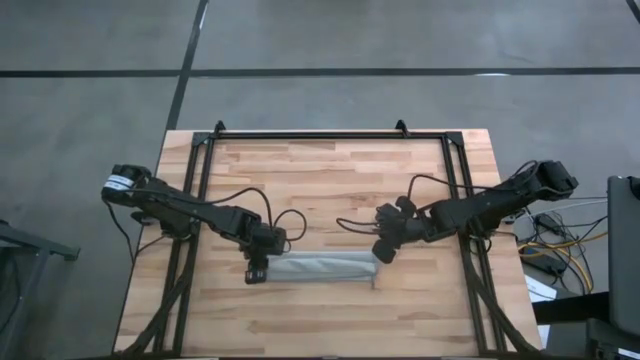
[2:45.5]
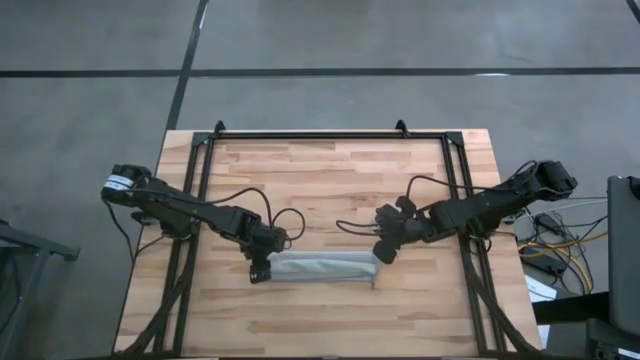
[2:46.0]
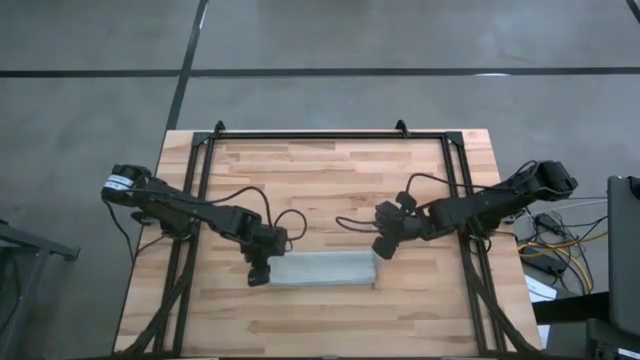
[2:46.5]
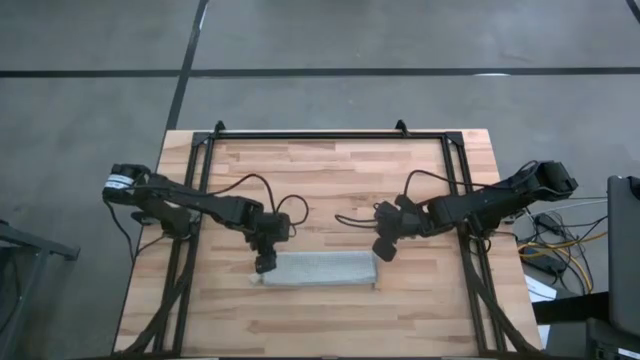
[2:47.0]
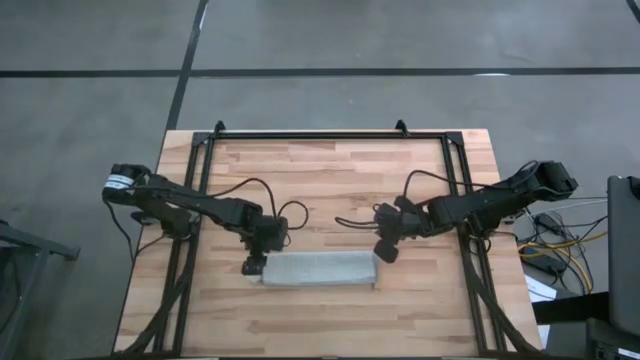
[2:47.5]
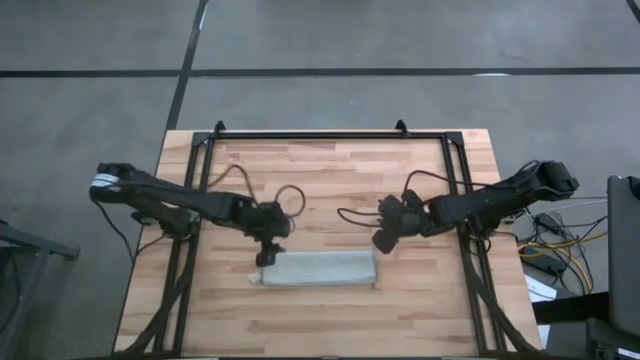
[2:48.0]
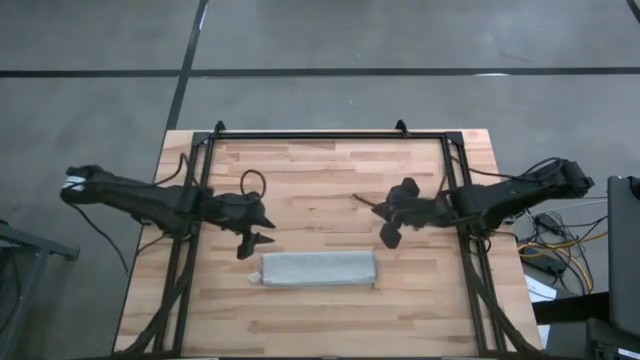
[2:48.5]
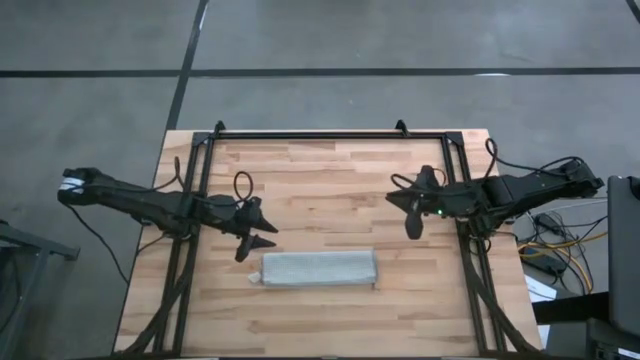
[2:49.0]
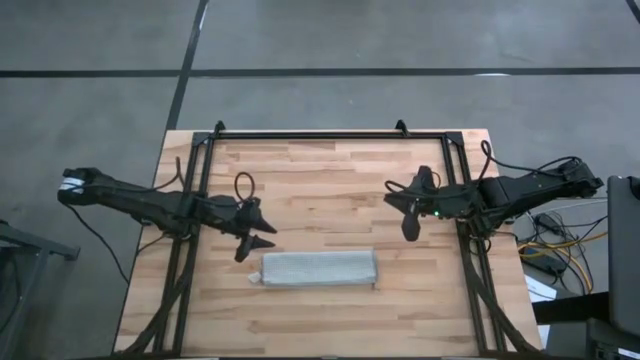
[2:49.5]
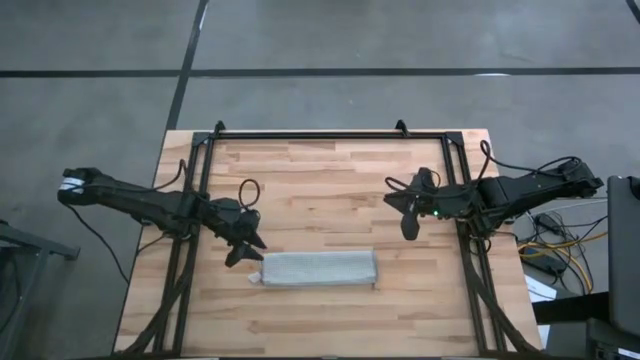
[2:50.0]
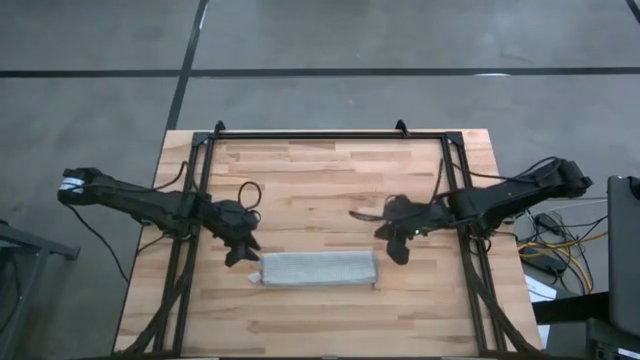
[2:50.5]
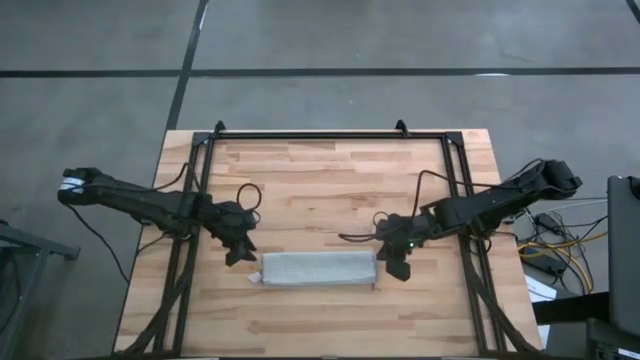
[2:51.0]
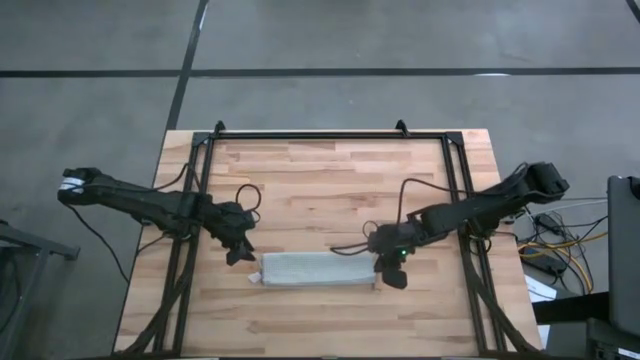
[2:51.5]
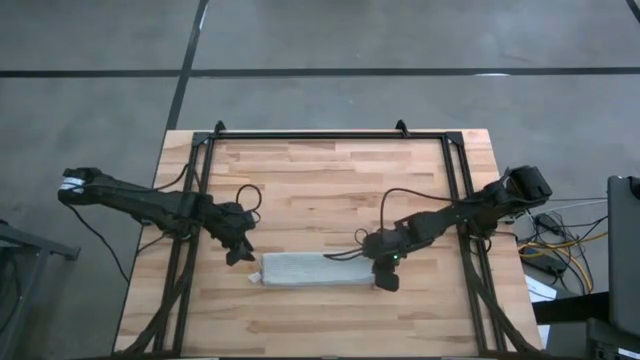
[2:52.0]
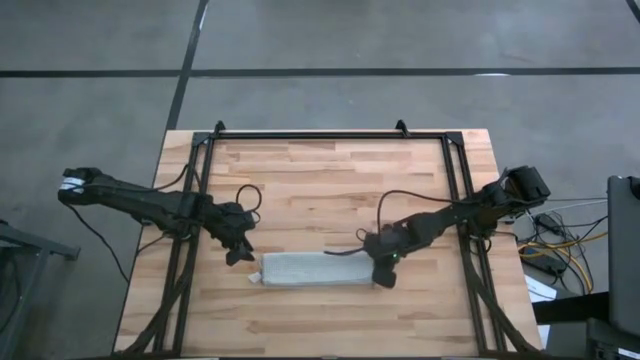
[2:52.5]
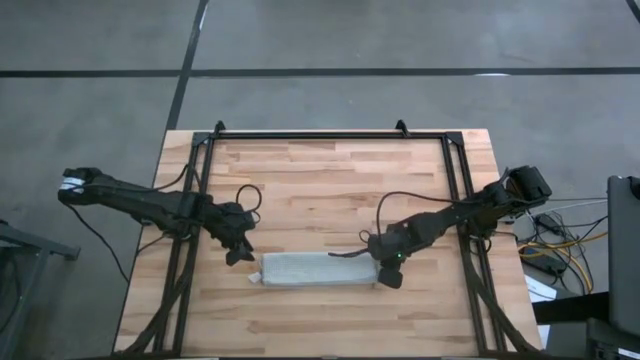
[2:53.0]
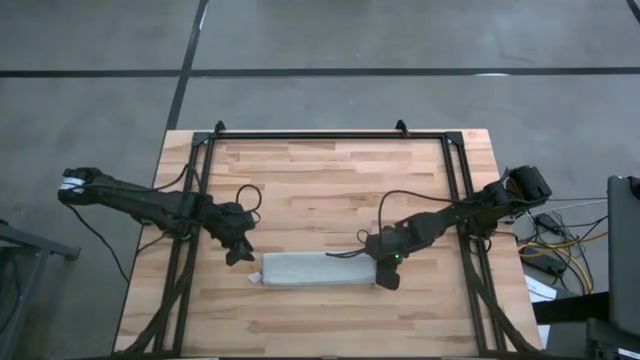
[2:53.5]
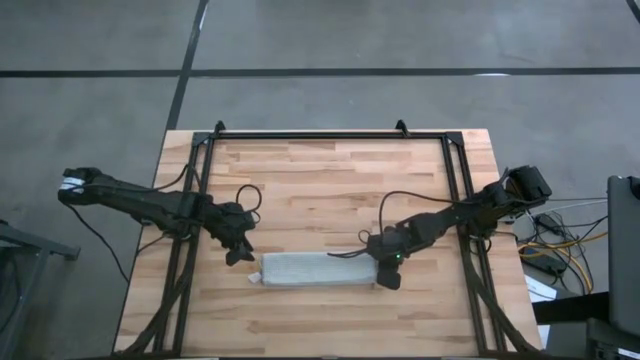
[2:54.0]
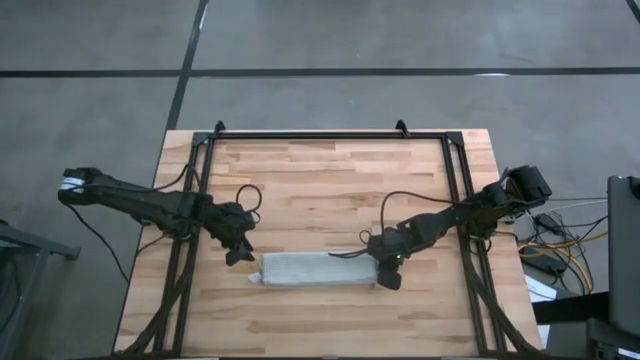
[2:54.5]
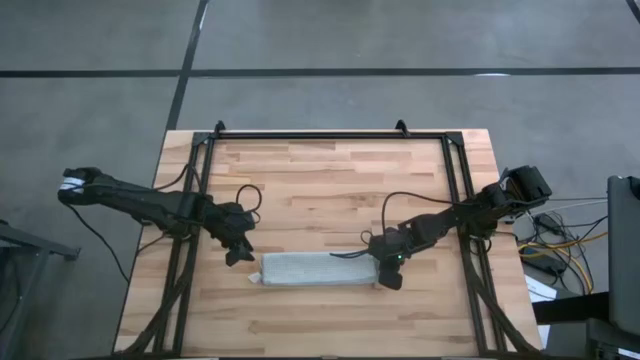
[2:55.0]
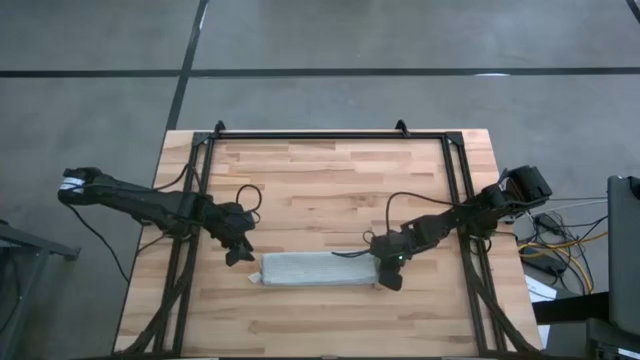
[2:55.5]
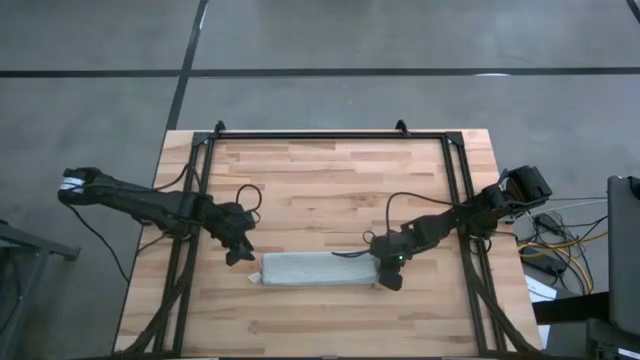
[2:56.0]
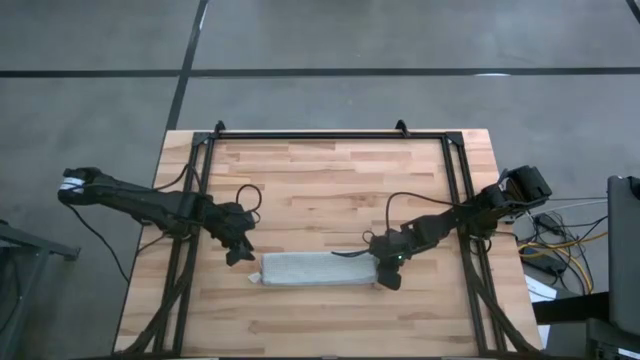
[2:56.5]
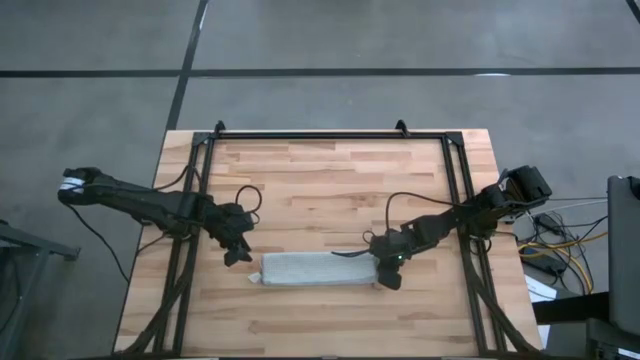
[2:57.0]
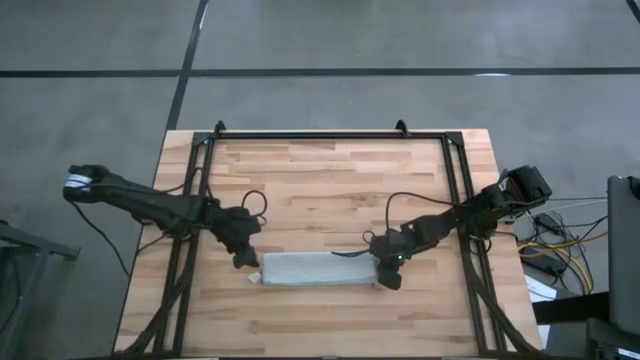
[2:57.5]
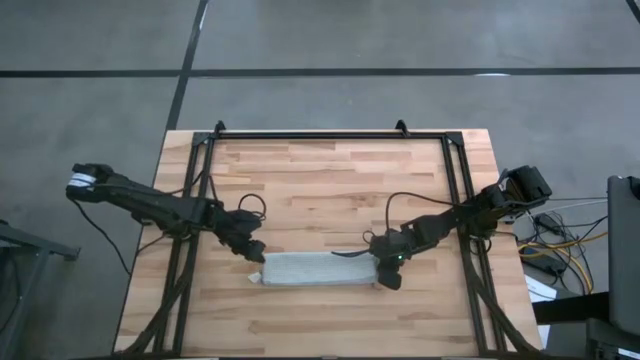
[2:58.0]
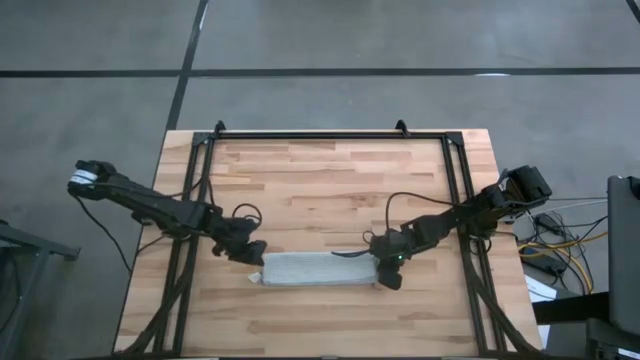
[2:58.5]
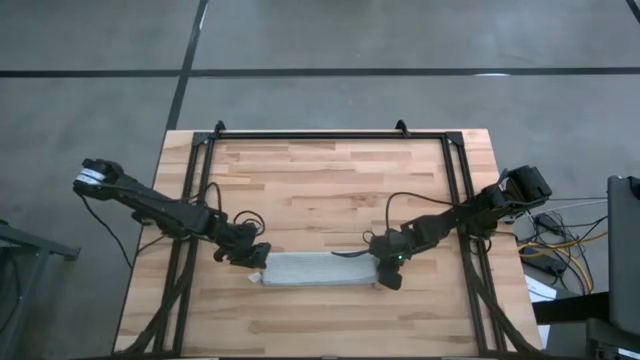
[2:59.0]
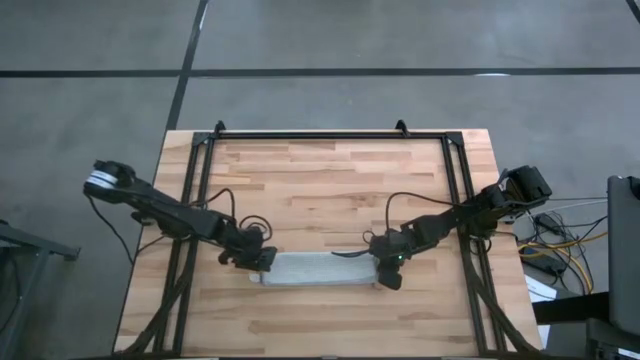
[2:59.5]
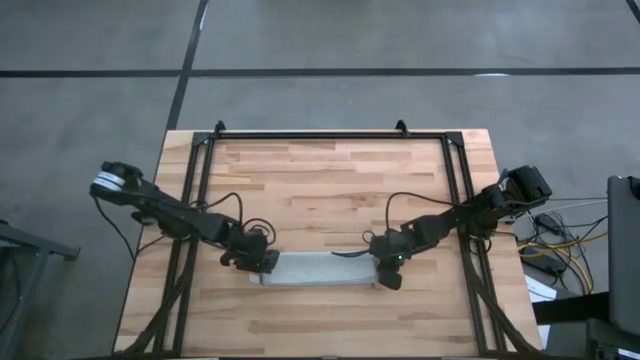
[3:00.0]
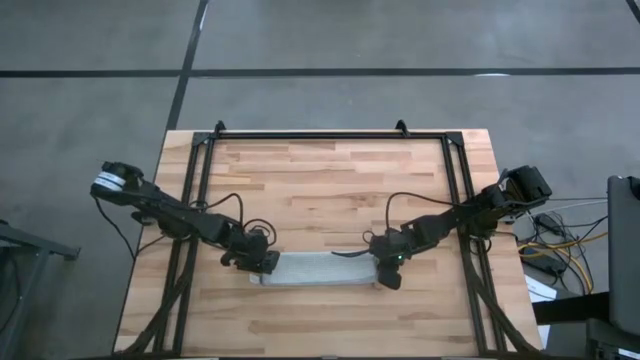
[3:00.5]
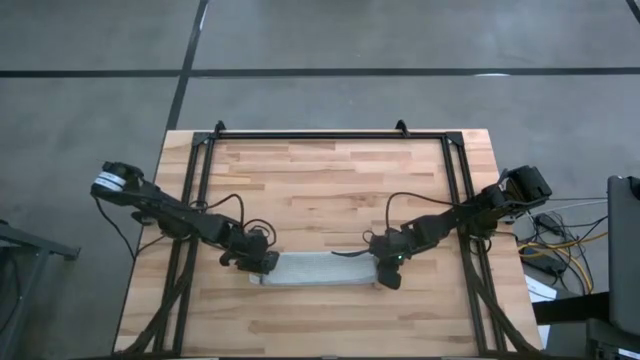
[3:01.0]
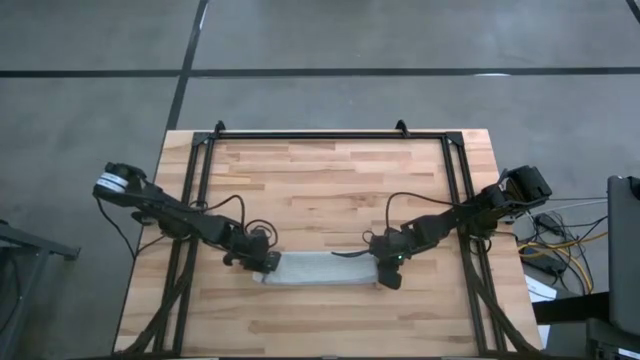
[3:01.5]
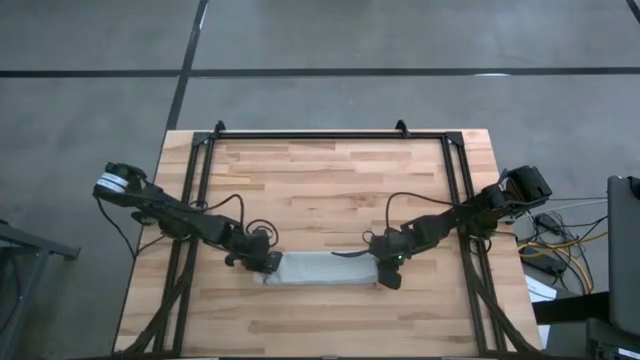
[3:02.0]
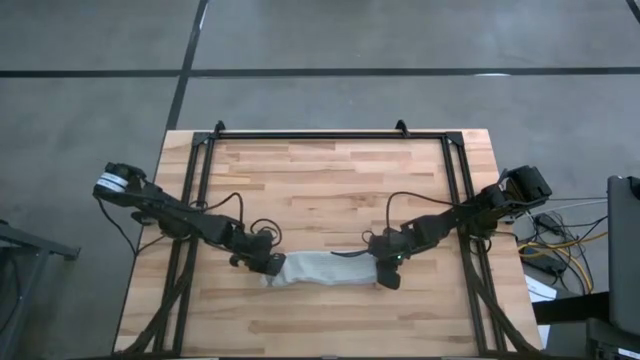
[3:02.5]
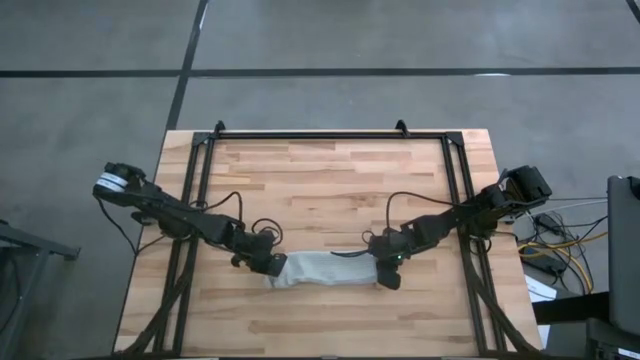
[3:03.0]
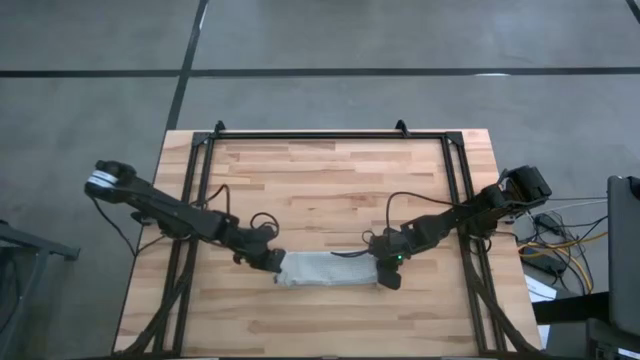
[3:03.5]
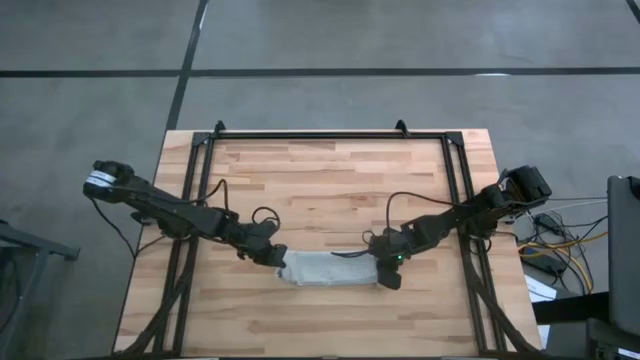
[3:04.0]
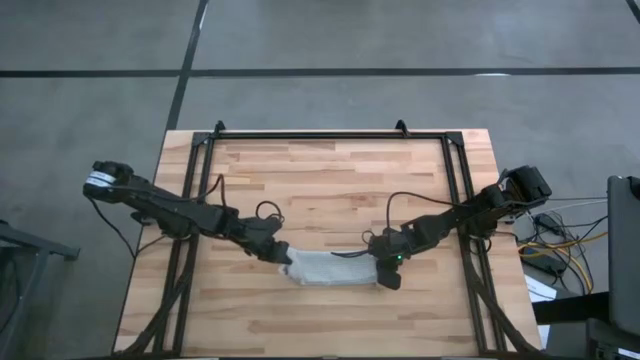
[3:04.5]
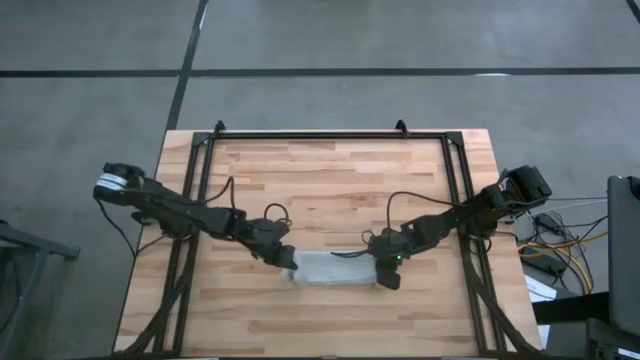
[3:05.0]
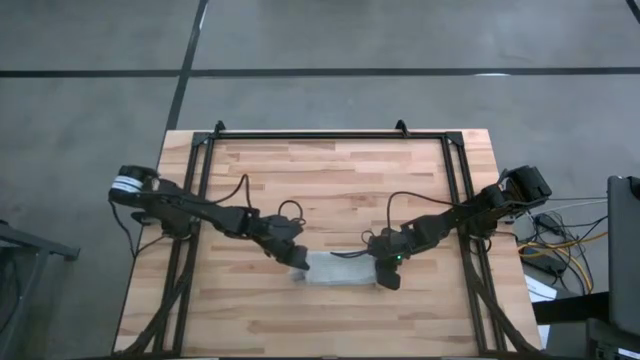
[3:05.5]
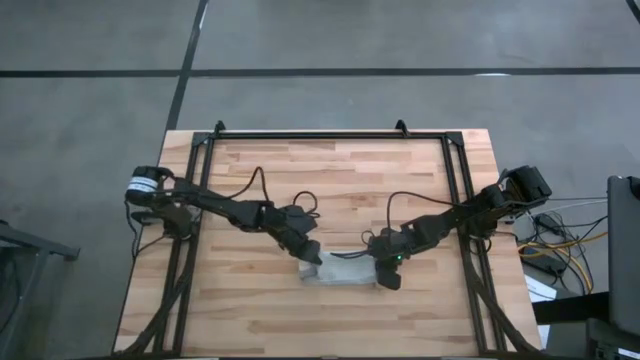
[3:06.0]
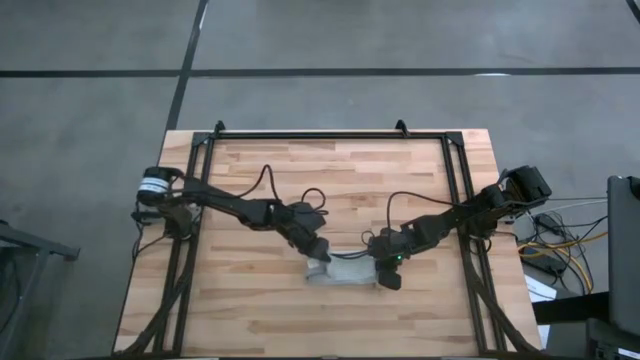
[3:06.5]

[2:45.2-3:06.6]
Task: Fold microfiber towels
Fold the microfiber cloth on the table
